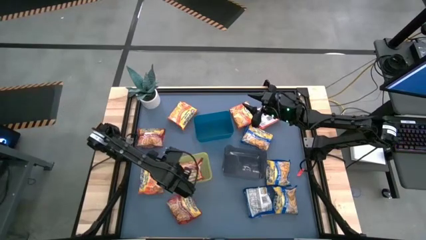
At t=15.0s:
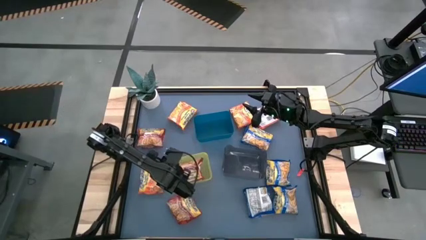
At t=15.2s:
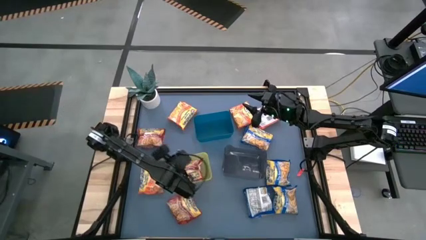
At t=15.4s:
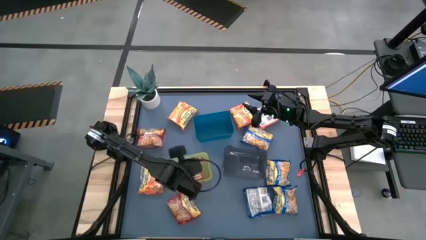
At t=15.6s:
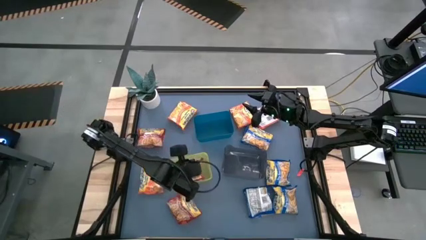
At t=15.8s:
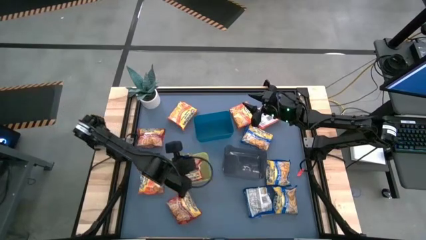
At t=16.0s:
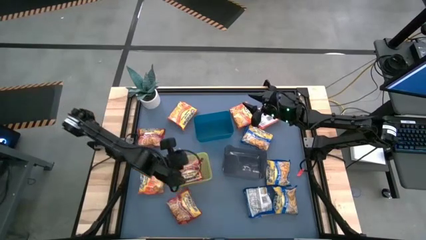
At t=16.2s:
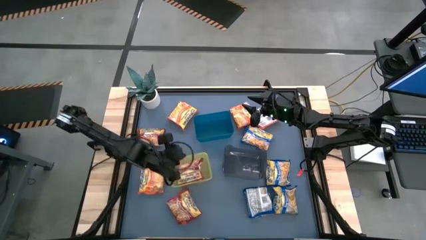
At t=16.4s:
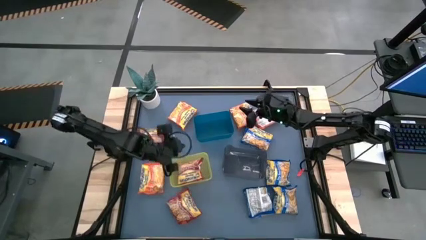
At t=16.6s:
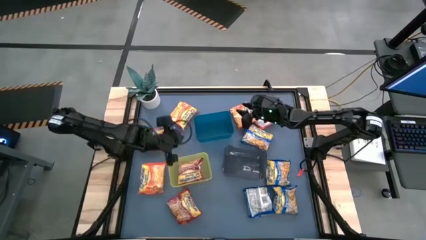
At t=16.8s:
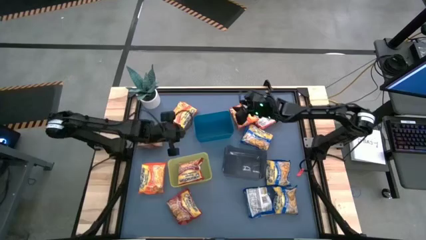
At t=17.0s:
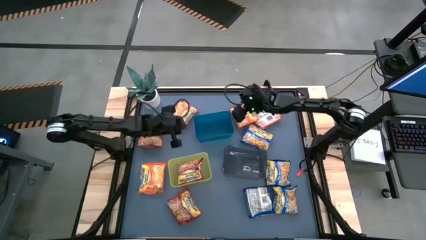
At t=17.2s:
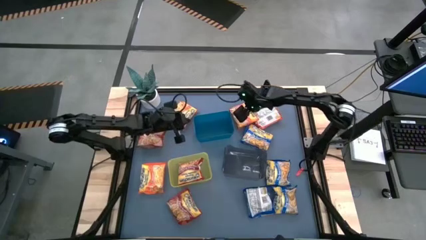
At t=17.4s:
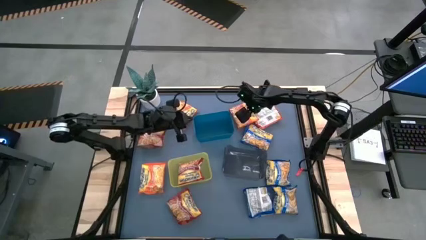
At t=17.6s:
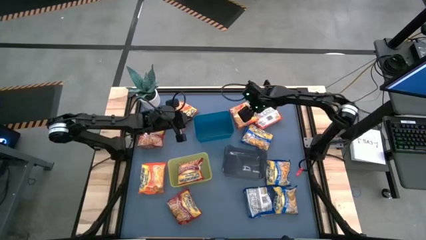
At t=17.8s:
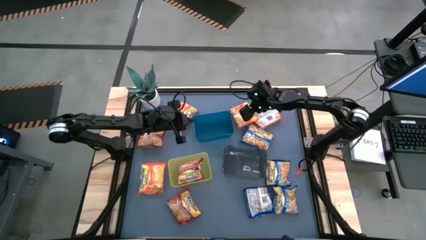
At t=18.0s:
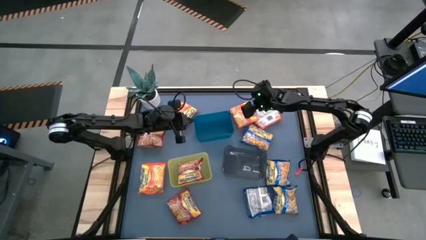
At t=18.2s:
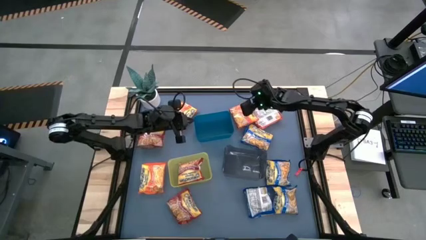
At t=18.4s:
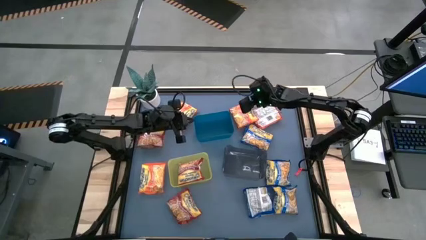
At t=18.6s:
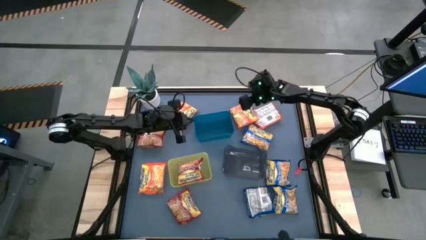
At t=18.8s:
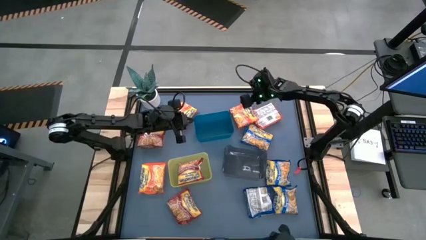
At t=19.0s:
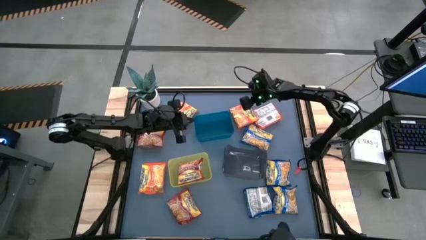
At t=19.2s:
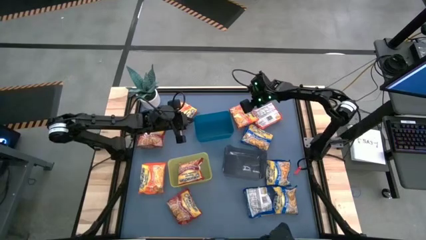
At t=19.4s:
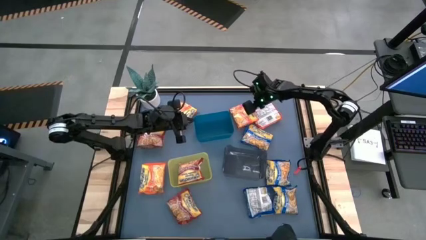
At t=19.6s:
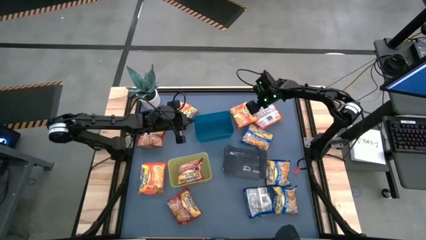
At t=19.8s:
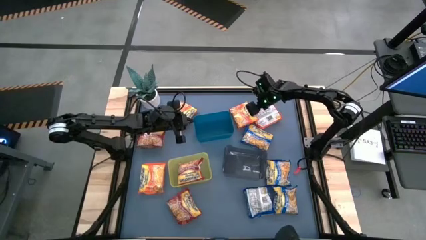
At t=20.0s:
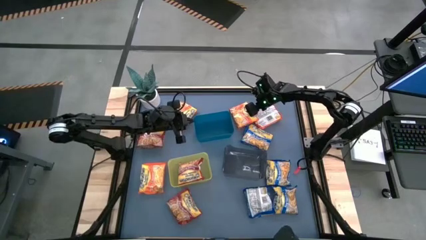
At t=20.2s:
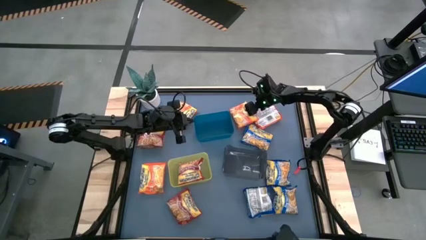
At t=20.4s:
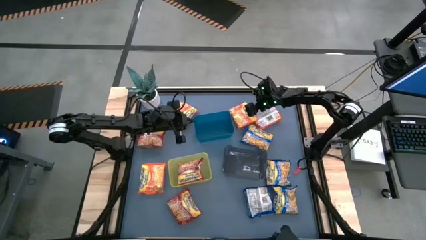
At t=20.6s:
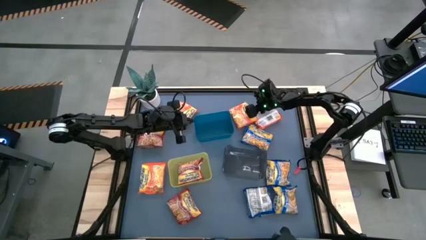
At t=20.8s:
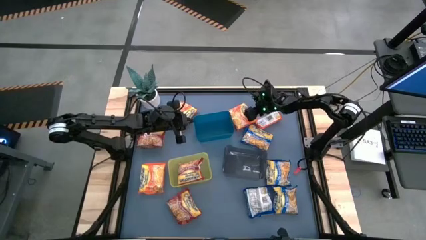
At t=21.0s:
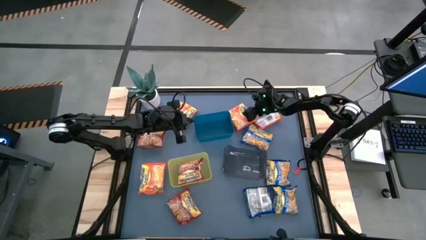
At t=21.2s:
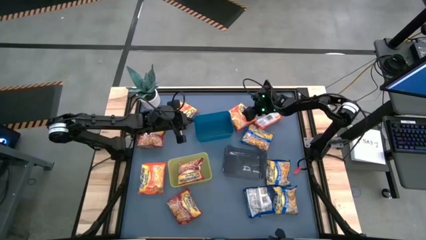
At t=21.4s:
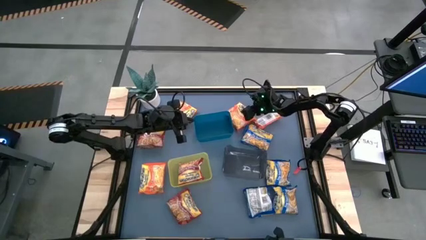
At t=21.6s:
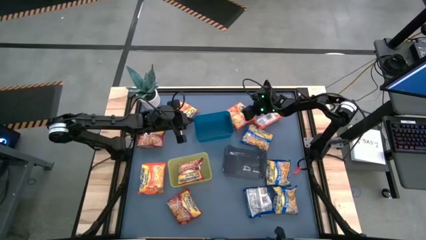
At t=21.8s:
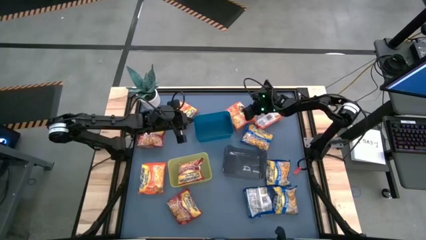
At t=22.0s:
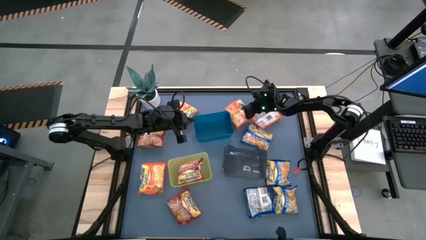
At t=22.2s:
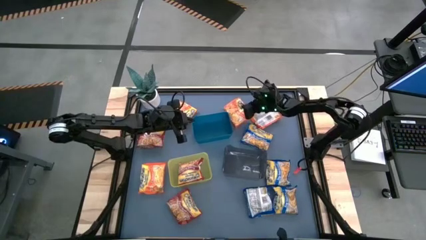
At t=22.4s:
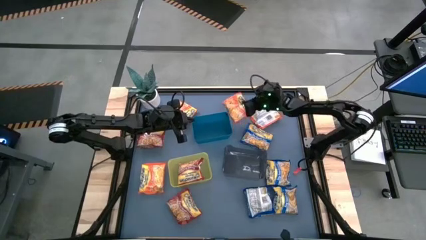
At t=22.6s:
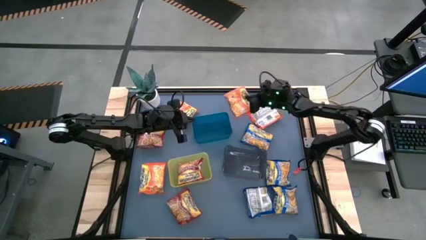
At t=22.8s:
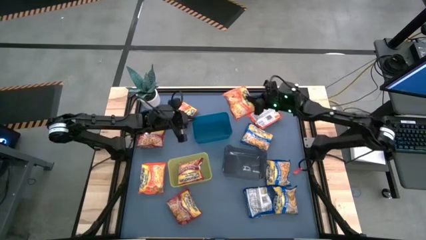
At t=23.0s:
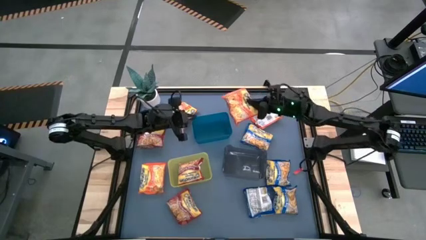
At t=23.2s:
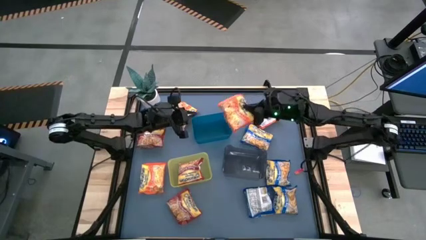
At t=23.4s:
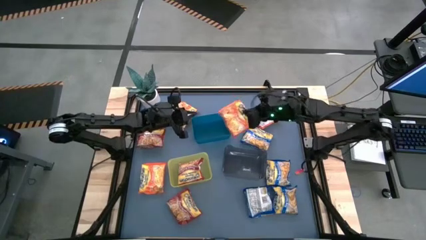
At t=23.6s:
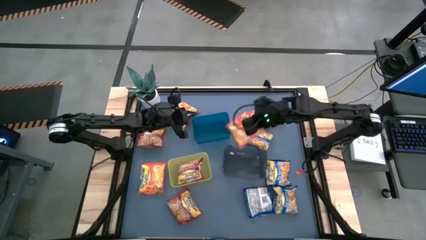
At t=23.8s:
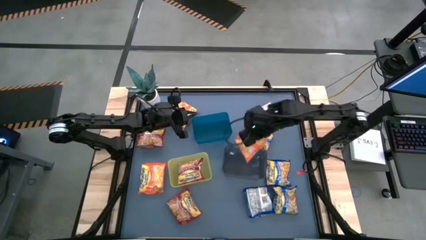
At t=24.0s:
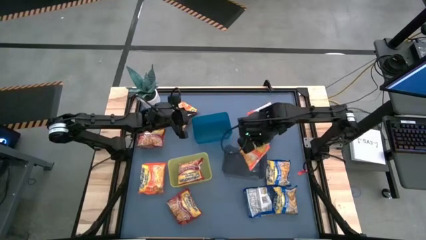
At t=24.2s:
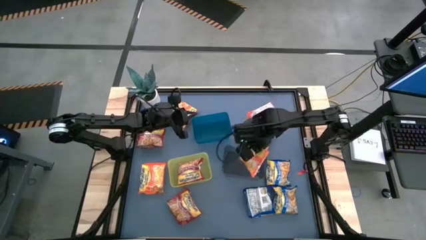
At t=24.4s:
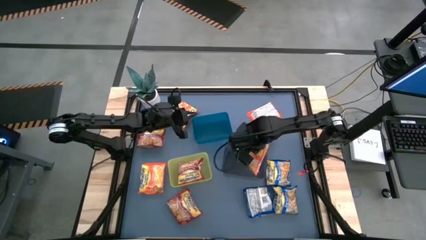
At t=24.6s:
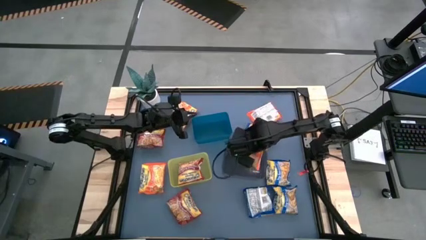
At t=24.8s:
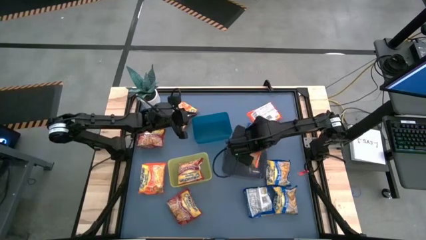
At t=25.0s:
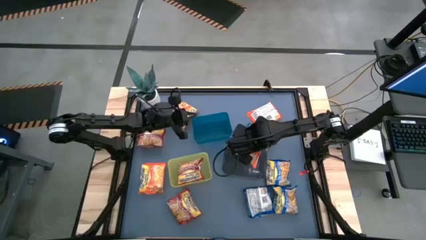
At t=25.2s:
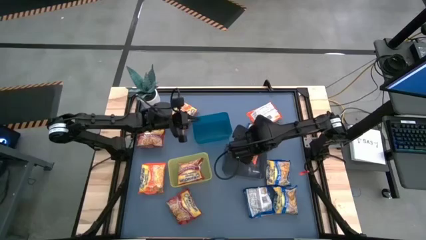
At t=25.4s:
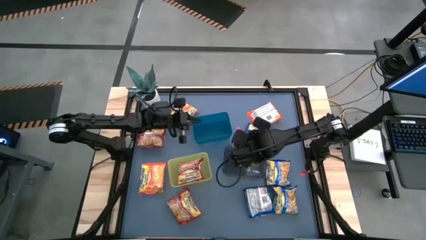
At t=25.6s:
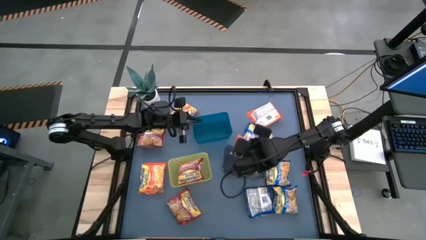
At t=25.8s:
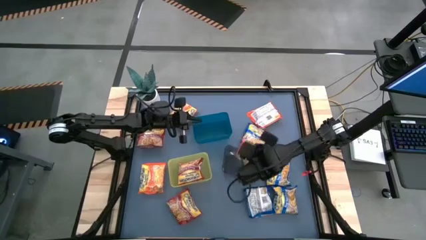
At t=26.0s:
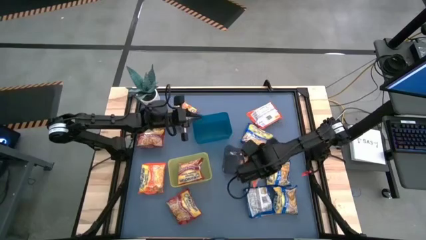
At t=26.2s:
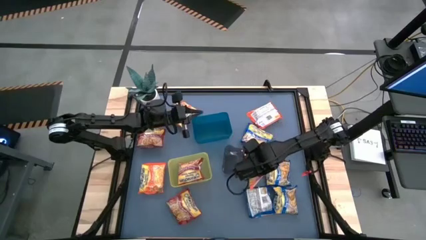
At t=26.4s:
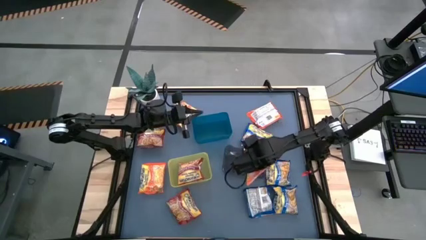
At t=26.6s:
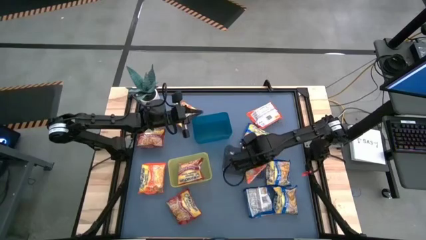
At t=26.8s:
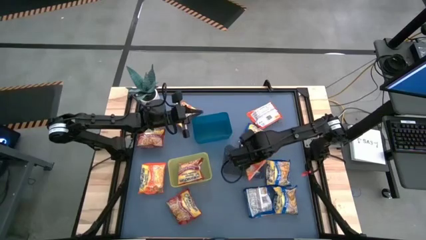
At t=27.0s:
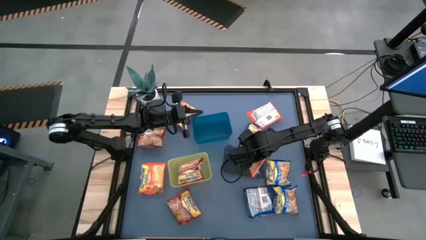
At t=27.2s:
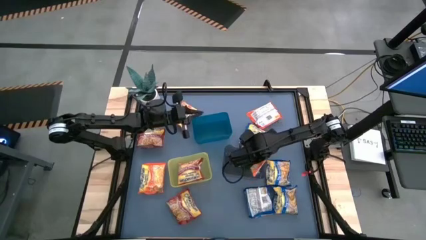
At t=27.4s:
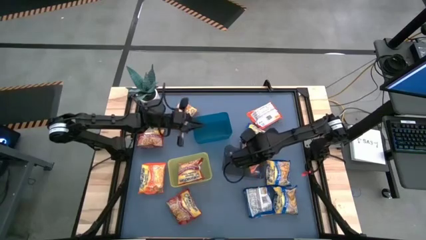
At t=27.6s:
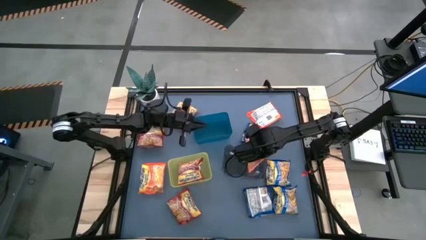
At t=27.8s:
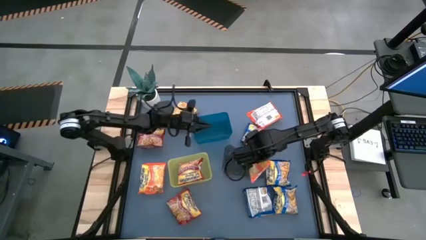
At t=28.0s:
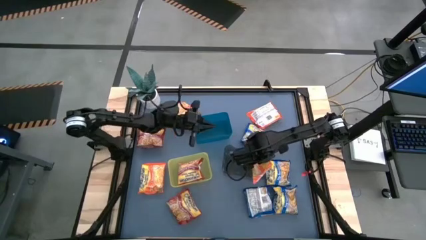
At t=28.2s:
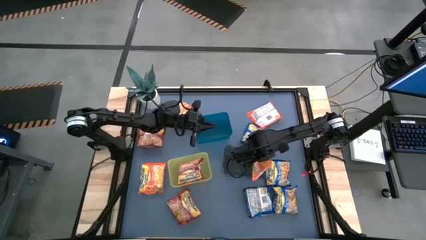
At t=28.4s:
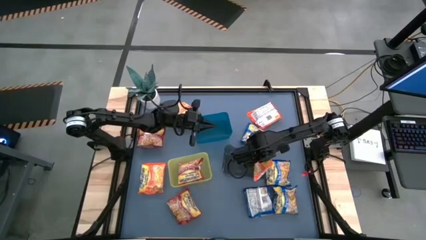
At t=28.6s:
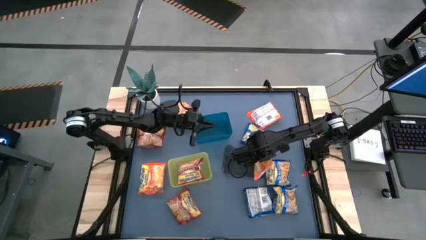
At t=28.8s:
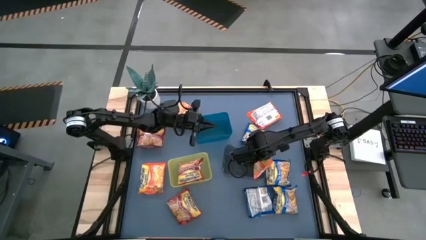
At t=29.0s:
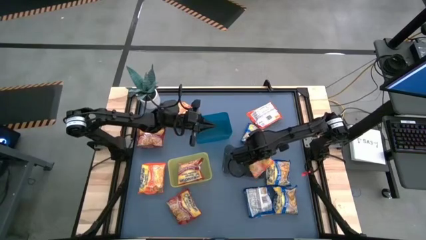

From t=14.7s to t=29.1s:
Task: Sort Maruchan noodles
Put the orange noodle pack into the black bin
